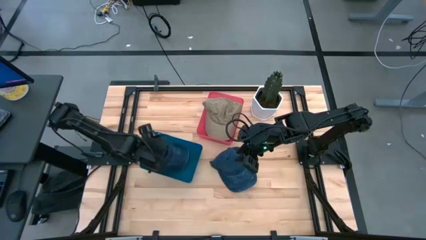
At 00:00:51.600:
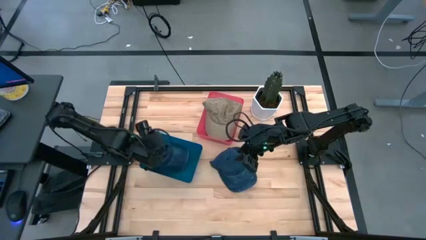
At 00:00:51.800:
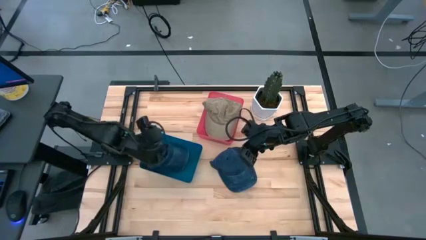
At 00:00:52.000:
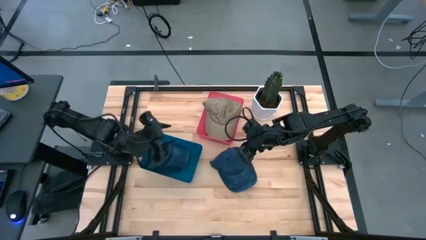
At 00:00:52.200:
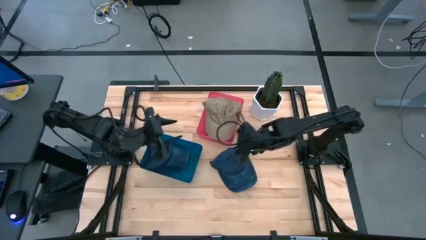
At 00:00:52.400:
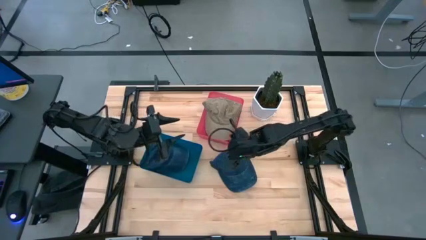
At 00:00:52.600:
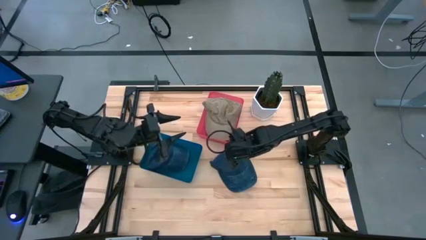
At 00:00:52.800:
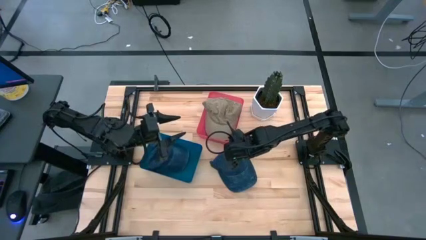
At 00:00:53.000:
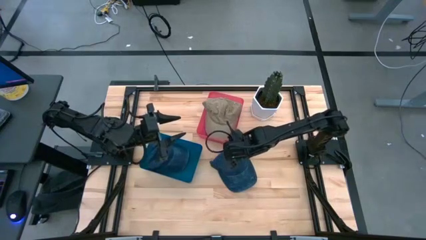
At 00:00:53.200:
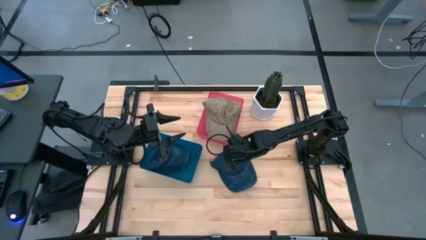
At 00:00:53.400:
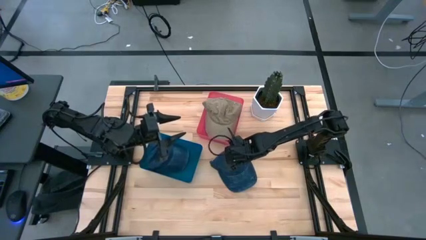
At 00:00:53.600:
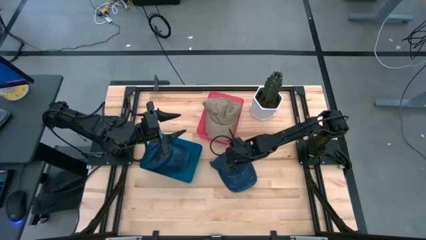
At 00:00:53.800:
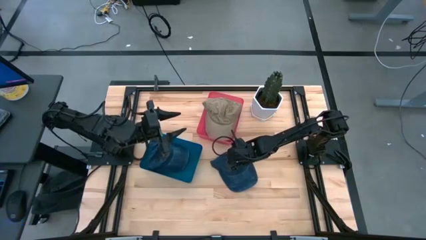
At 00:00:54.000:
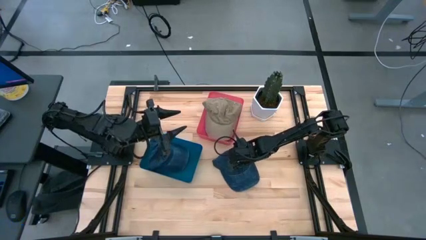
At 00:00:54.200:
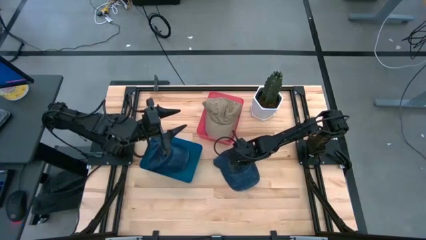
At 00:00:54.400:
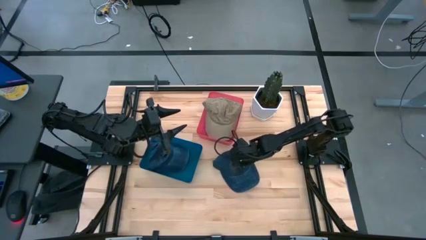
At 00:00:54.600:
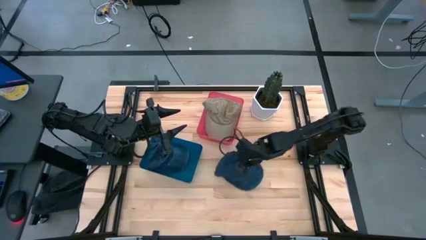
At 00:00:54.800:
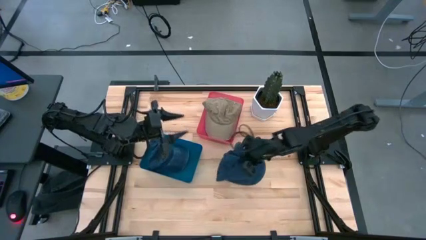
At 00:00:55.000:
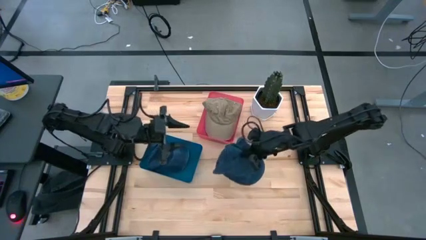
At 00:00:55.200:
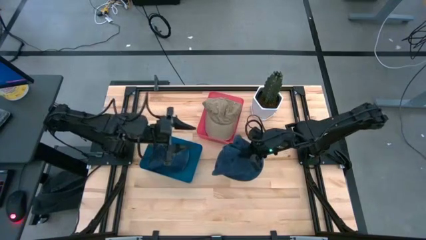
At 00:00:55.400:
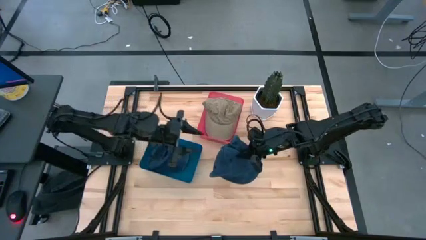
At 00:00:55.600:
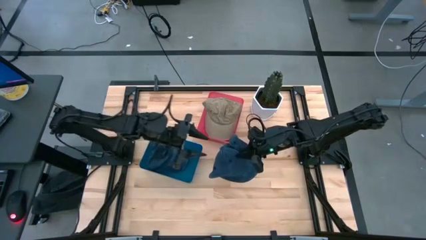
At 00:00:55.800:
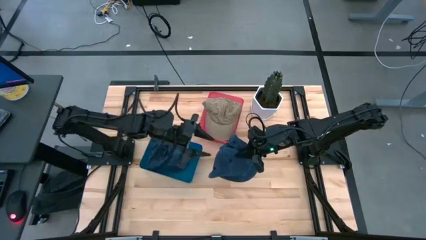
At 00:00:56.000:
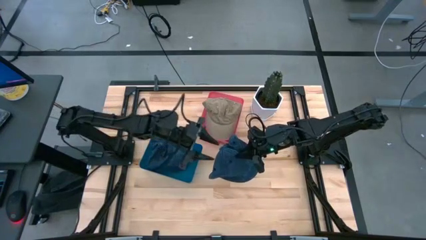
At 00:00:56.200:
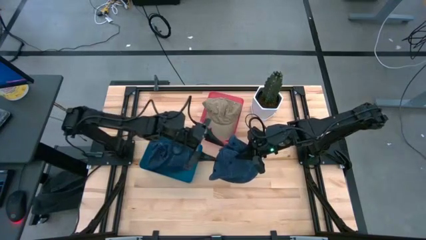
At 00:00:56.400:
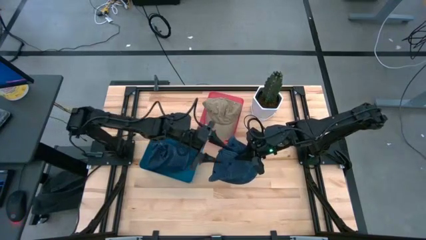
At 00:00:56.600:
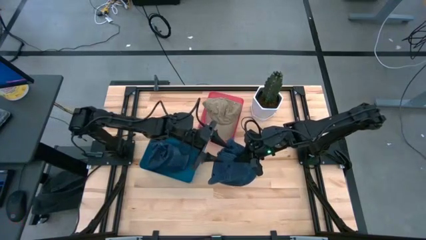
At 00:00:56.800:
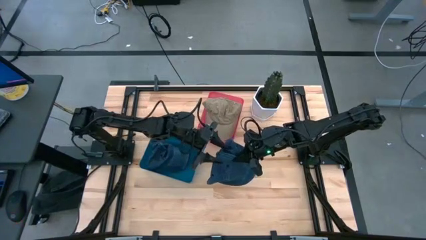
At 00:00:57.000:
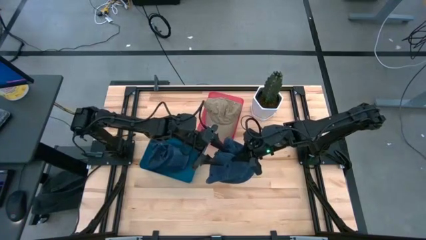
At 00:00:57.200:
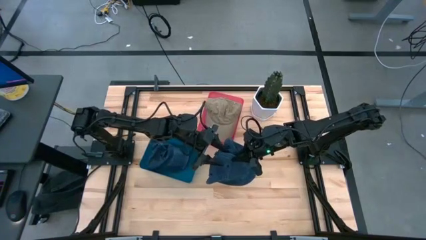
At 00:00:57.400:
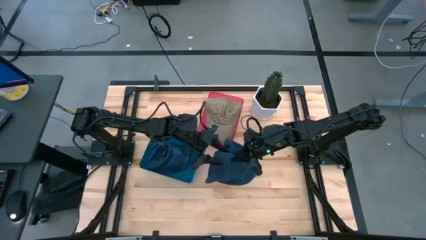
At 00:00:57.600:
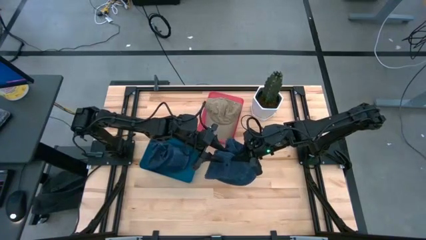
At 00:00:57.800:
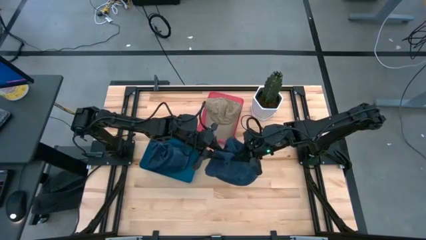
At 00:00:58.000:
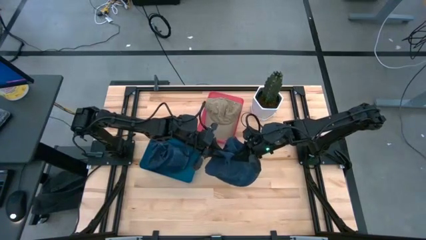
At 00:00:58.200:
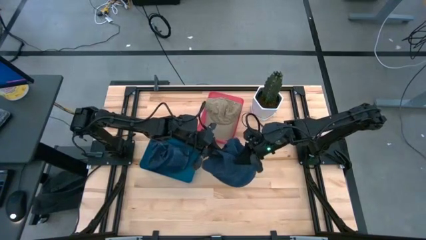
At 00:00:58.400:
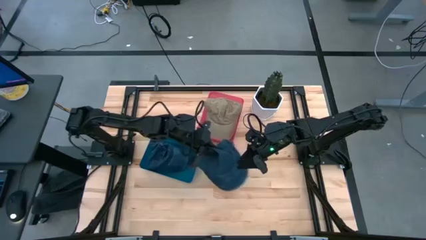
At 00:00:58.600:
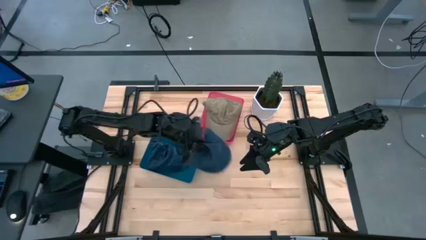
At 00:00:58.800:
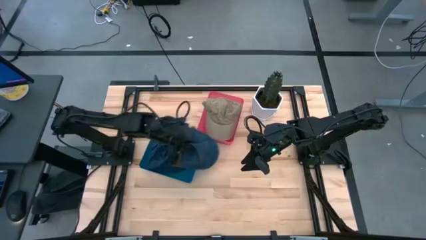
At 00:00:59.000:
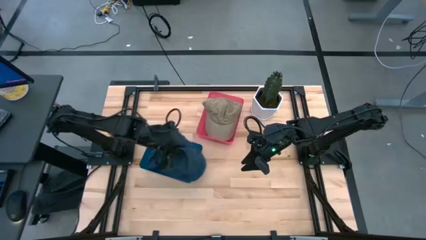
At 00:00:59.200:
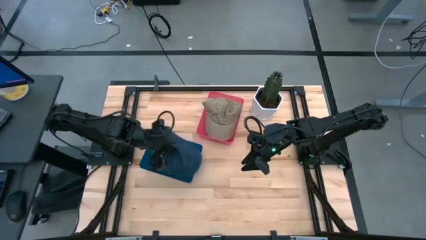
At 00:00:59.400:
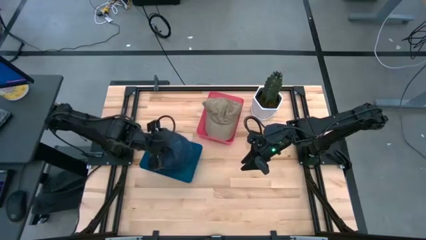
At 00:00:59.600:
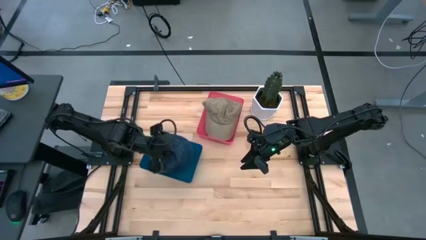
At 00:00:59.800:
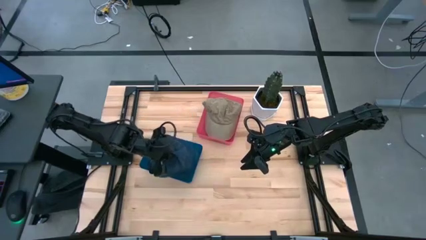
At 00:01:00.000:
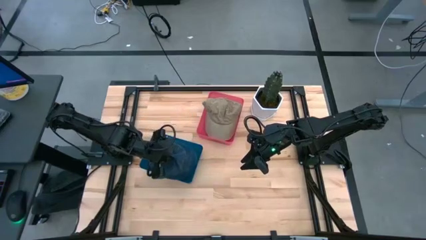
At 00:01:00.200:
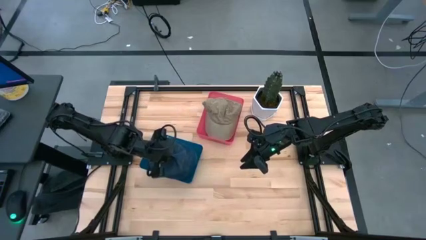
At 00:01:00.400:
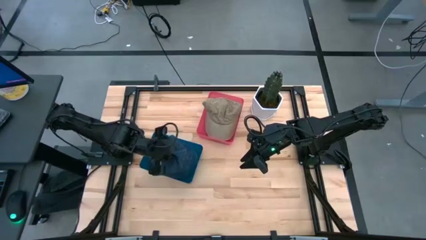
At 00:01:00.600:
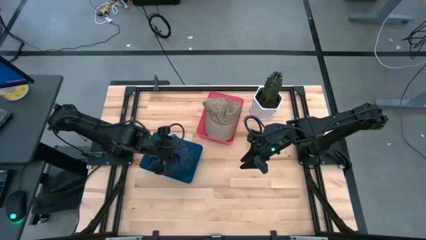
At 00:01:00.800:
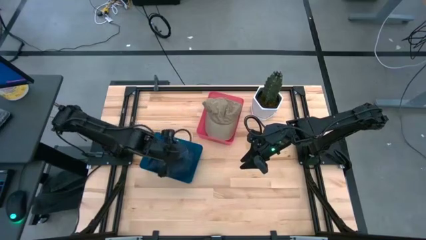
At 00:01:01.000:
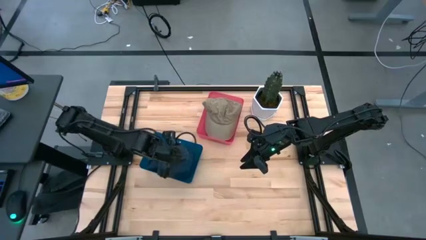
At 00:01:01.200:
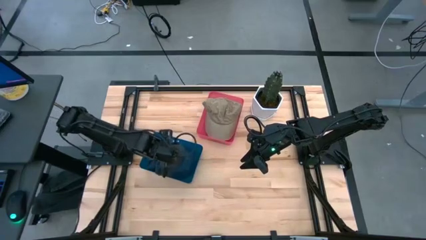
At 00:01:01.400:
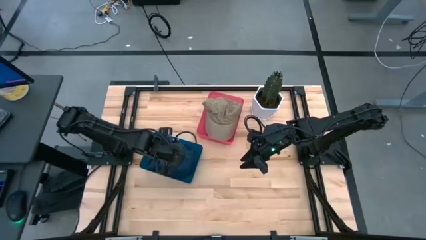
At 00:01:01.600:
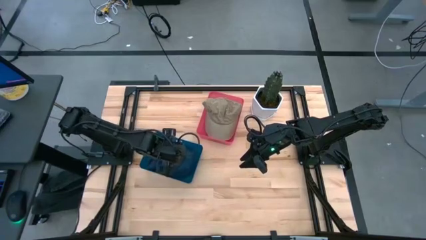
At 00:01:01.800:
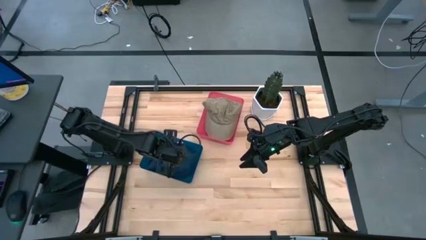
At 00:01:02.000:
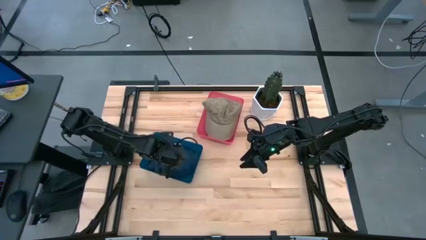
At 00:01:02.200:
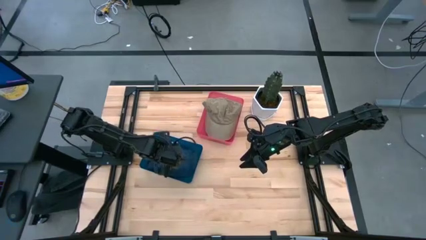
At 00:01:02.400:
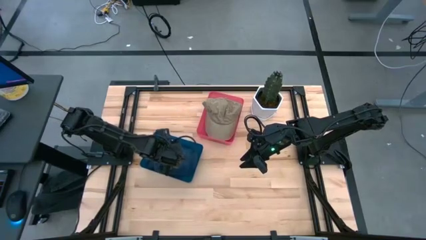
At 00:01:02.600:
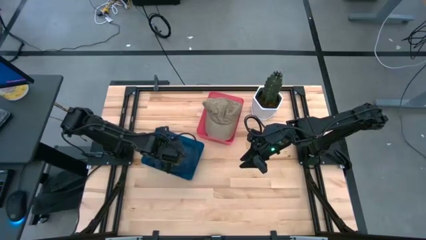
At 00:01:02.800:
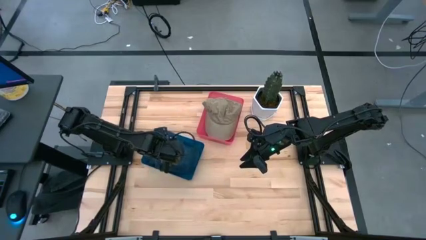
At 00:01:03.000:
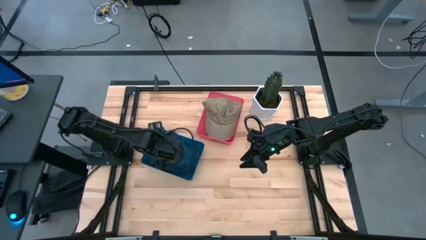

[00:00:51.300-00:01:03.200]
Task: Pick & Place hat
Put the blue cap into the blue bin
